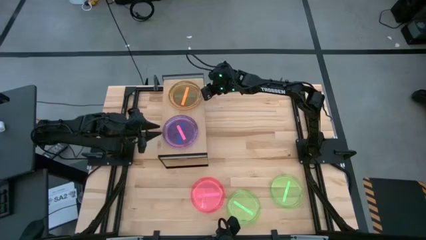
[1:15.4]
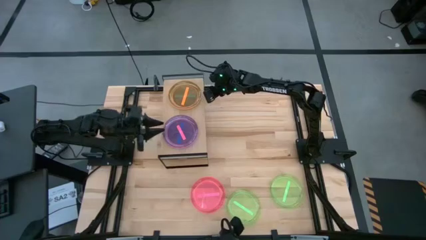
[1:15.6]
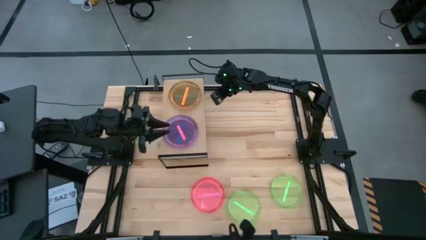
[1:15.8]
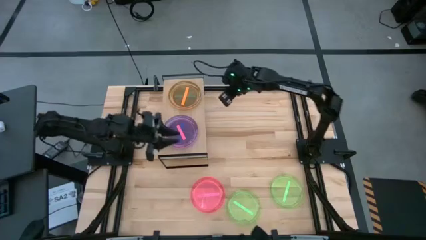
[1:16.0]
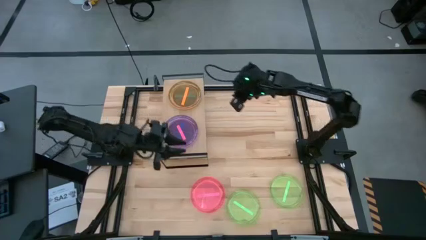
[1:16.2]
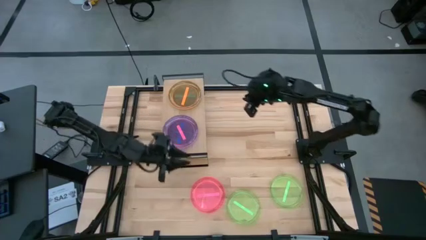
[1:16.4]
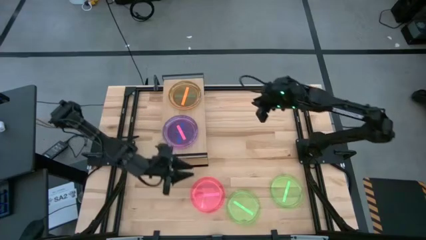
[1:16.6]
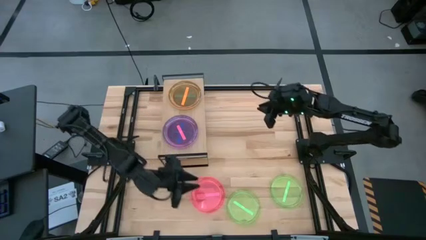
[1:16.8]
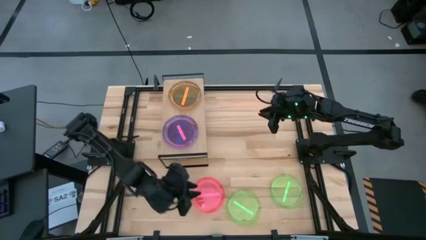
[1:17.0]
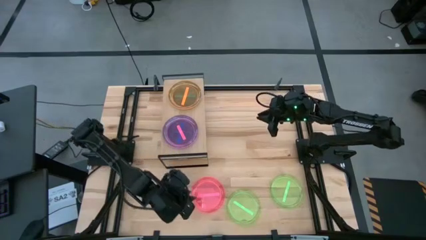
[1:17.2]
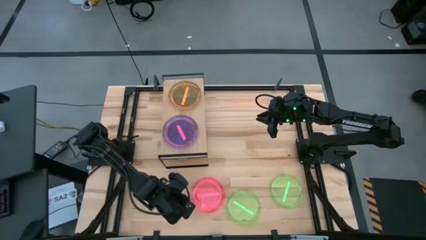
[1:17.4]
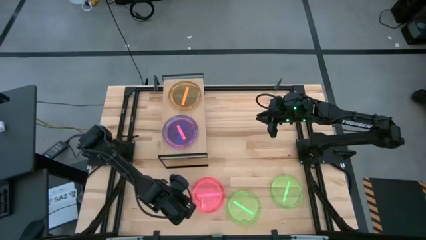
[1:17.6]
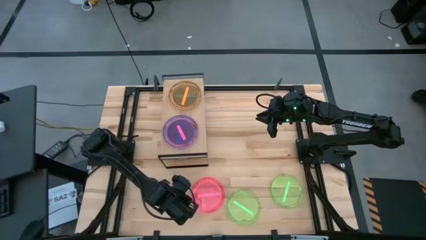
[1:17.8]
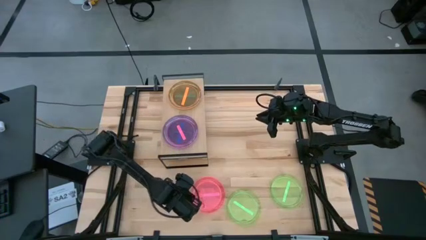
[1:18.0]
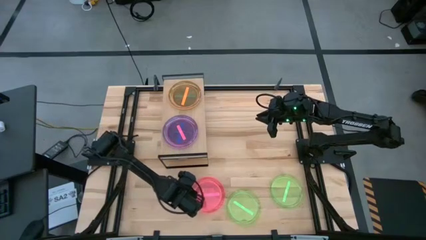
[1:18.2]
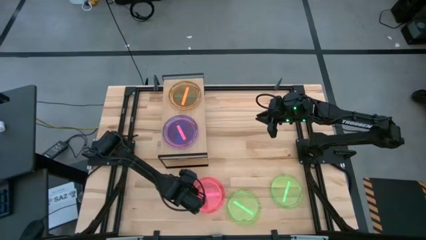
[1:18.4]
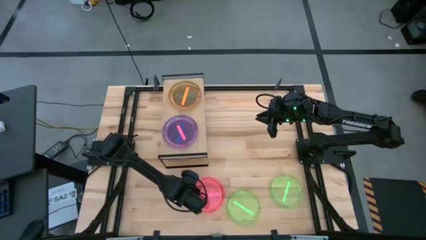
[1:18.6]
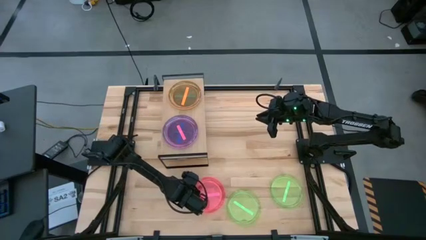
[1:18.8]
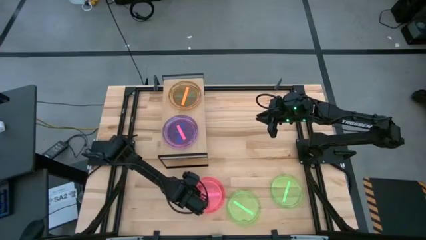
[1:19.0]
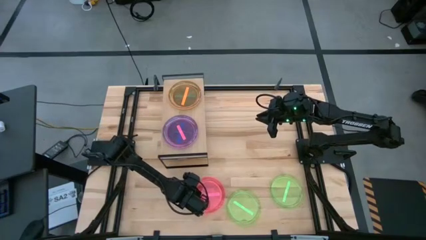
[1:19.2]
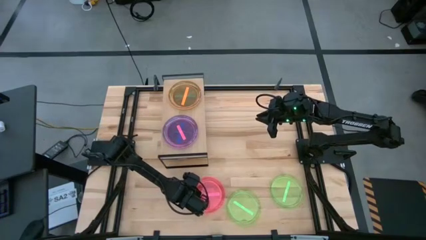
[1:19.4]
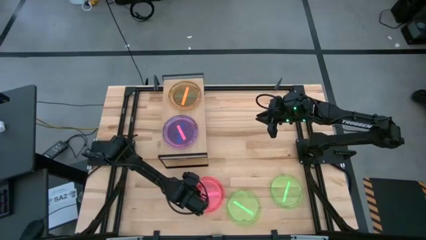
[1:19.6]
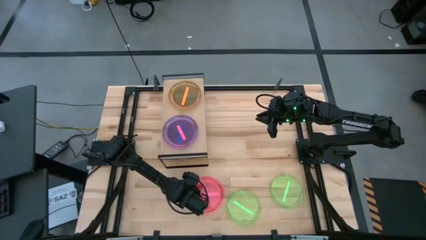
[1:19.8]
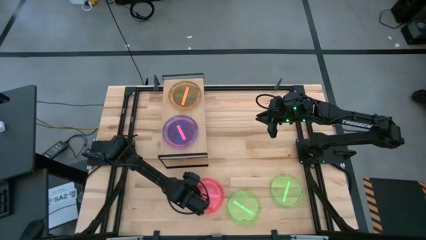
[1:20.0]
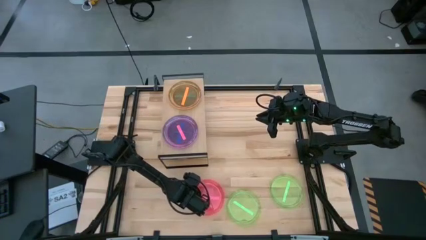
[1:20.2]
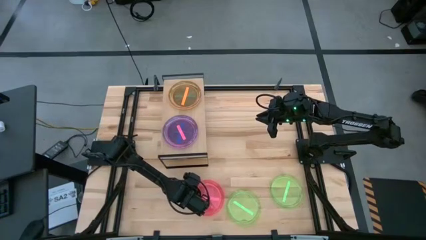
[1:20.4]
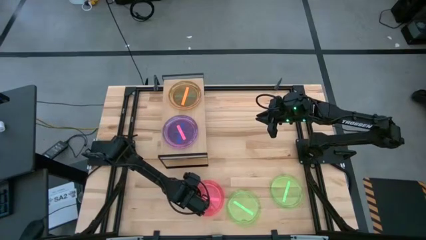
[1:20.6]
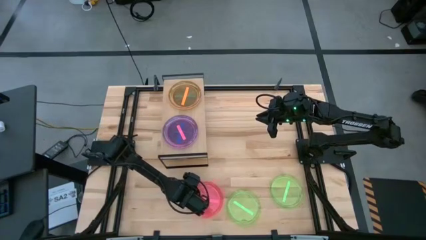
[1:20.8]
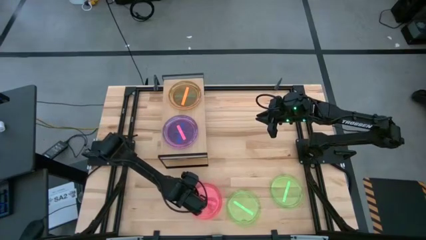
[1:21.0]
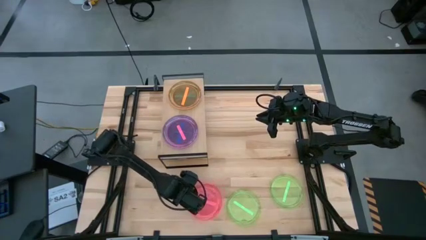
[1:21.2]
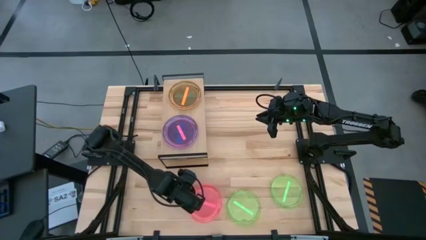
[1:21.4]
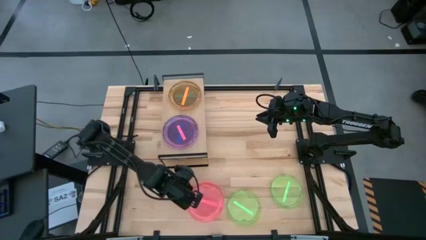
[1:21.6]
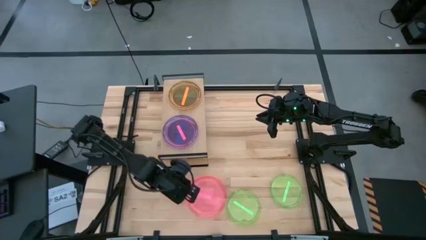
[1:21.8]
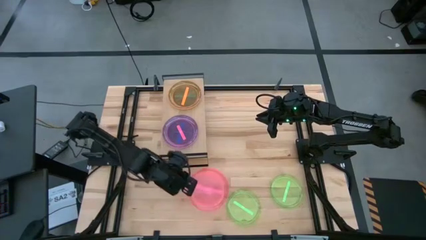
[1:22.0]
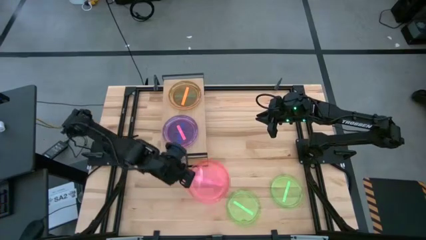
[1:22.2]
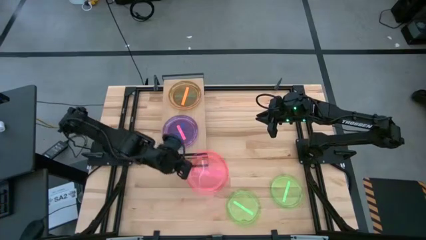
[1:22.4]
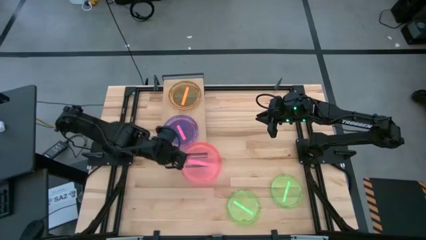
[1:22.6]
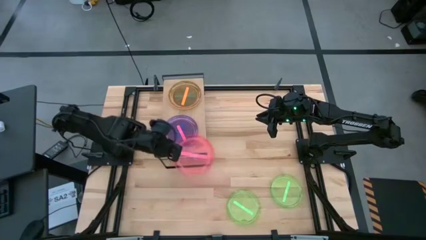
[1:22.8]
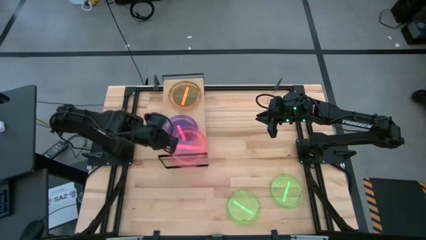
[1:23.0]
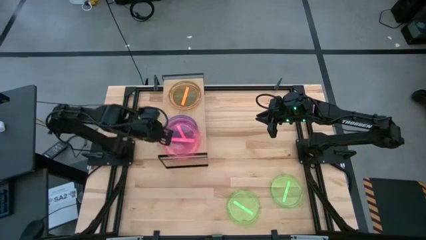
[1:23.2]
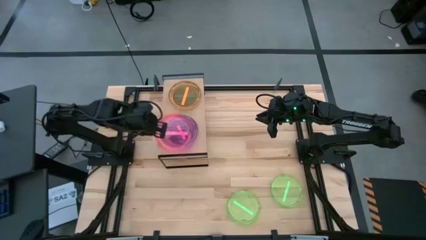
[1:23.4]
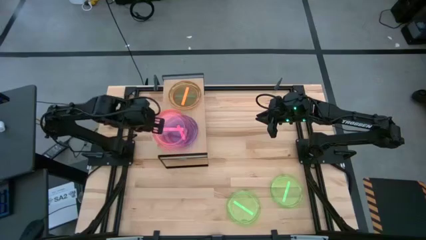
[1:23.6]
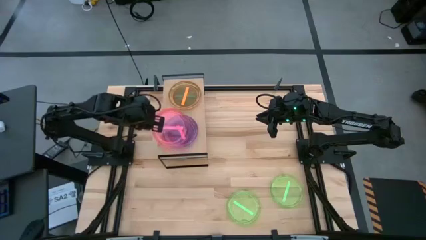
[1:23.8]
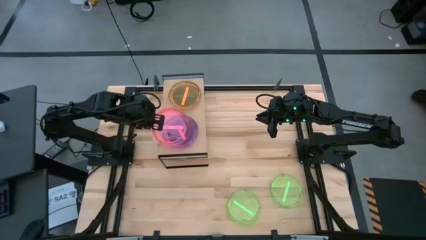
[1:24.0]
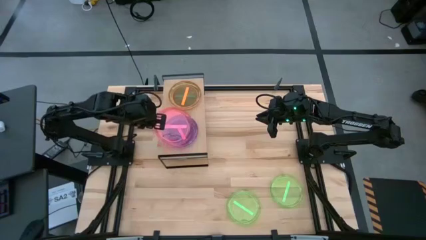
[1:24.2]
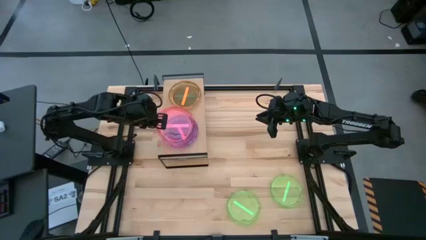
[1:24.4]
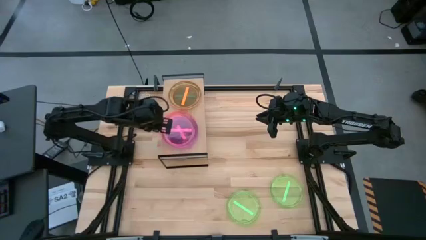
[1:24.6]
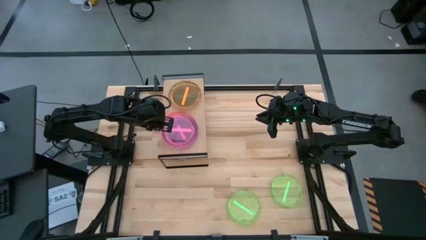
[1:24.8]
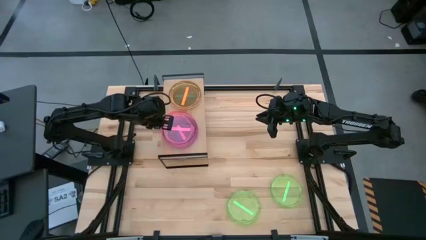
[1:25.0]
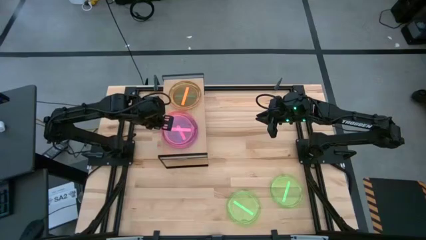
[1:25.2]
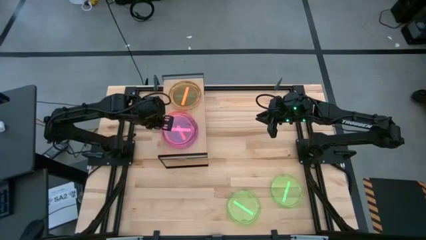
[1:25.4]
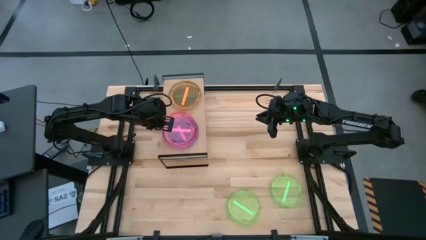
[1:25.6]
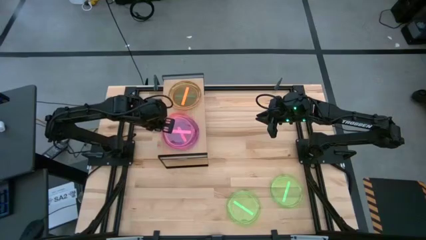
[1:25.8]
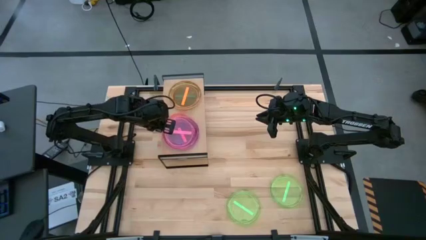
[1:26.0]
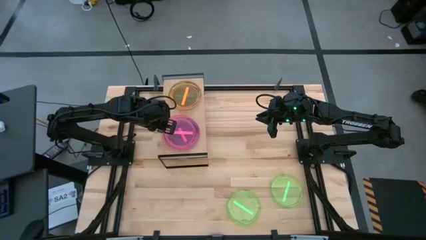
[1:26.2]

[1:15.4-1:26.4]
Task: Place and stack plates onto a shelf
Stack the pink plate on top of the pink plate on the shelf
